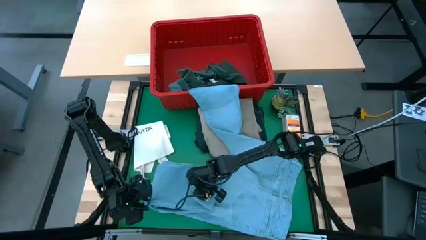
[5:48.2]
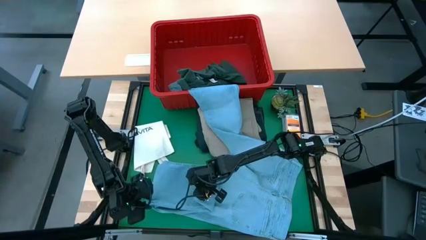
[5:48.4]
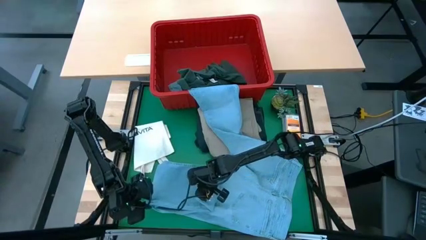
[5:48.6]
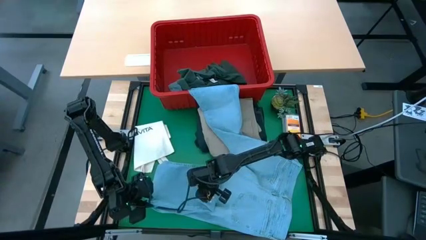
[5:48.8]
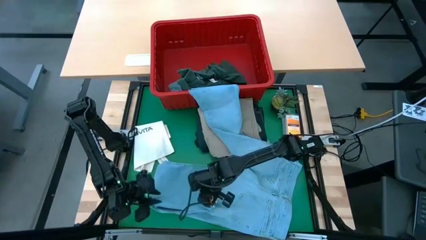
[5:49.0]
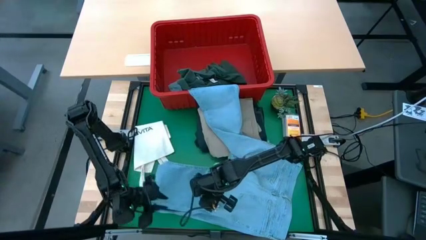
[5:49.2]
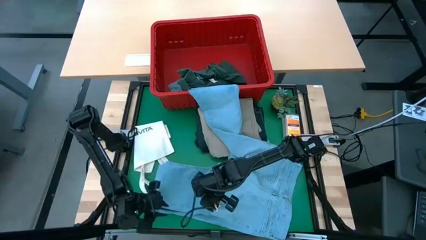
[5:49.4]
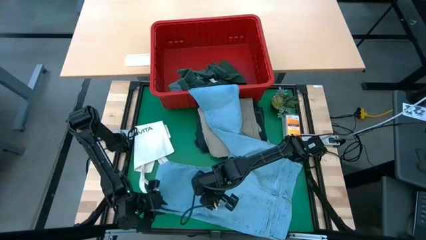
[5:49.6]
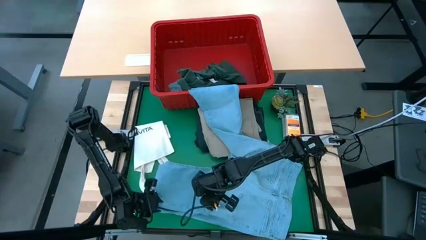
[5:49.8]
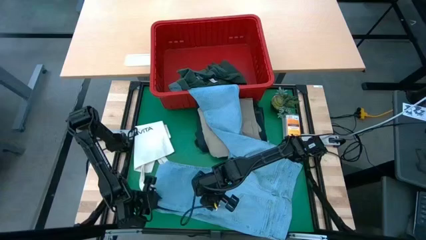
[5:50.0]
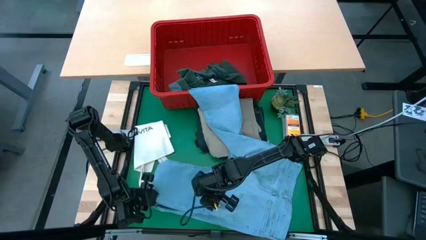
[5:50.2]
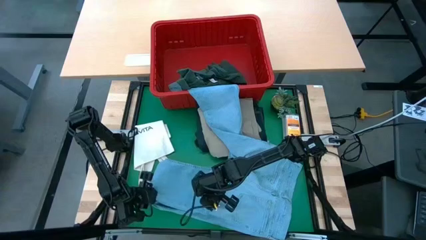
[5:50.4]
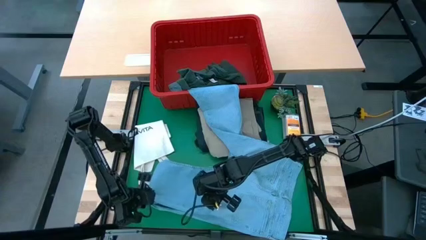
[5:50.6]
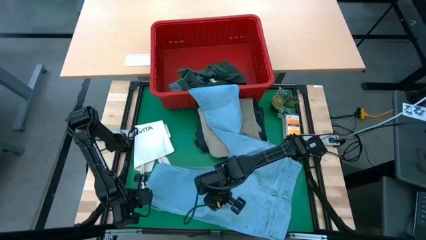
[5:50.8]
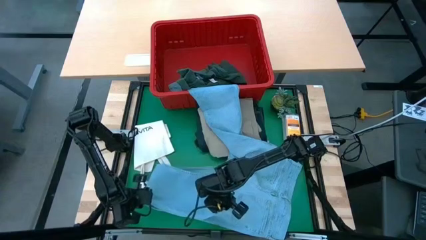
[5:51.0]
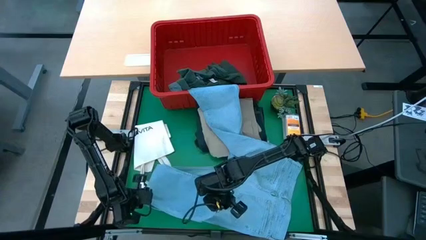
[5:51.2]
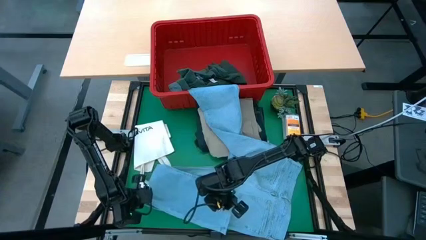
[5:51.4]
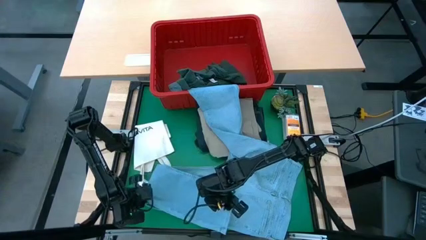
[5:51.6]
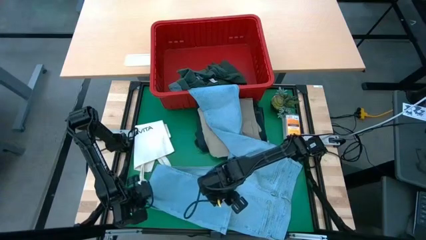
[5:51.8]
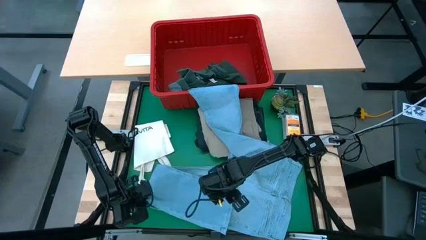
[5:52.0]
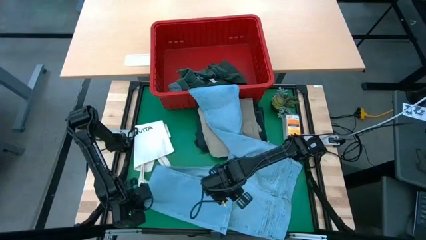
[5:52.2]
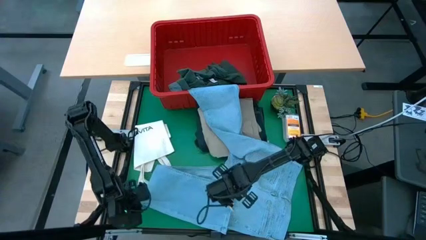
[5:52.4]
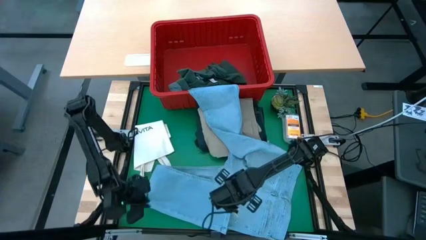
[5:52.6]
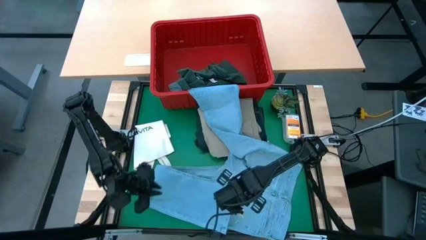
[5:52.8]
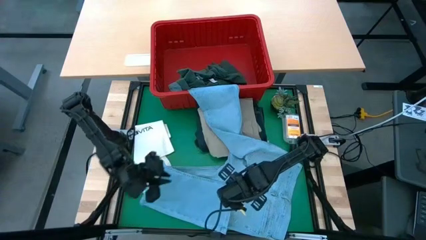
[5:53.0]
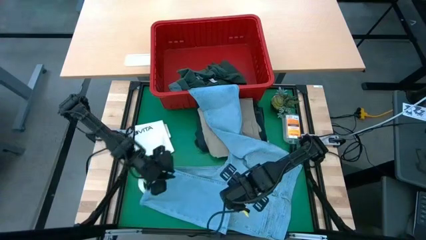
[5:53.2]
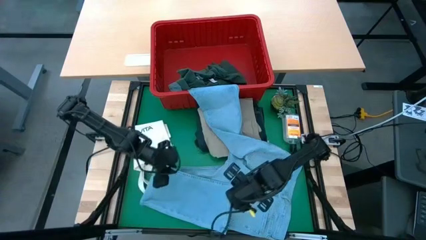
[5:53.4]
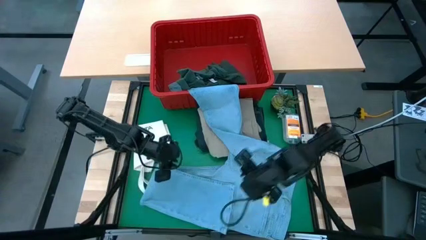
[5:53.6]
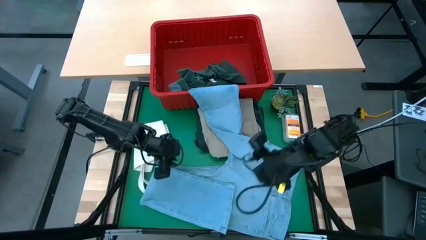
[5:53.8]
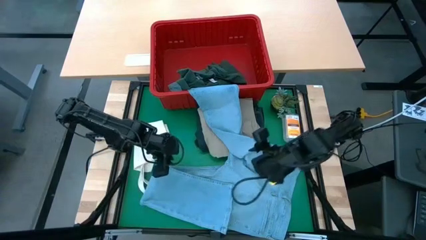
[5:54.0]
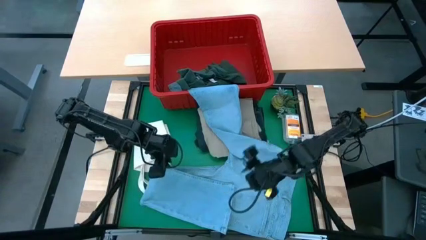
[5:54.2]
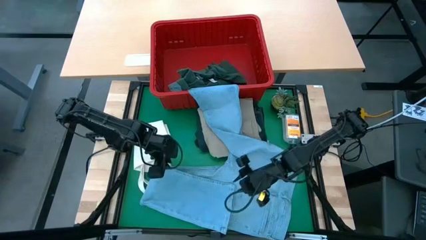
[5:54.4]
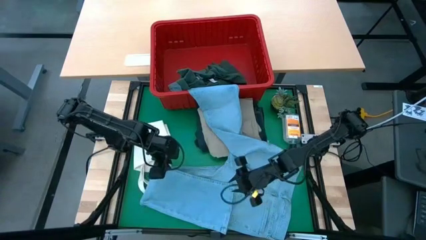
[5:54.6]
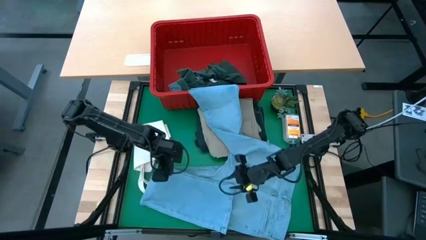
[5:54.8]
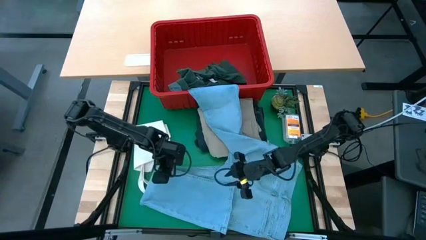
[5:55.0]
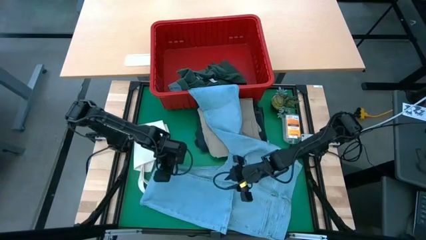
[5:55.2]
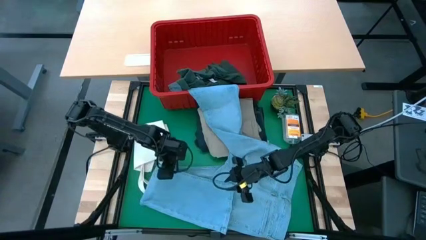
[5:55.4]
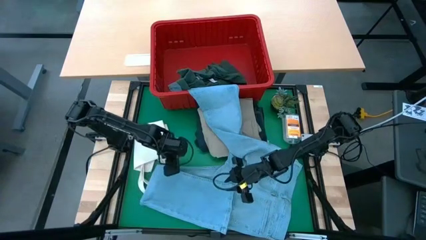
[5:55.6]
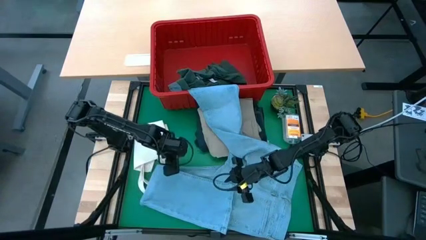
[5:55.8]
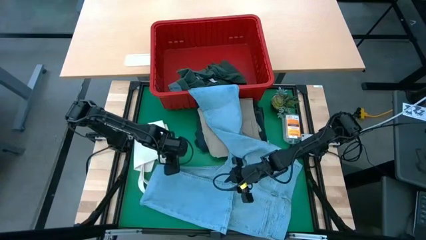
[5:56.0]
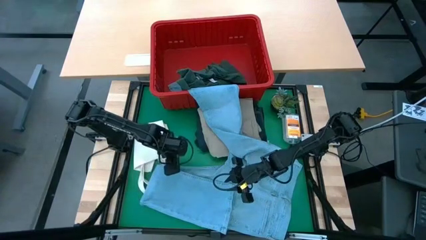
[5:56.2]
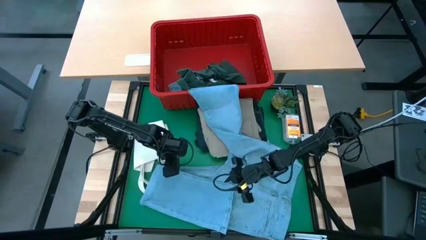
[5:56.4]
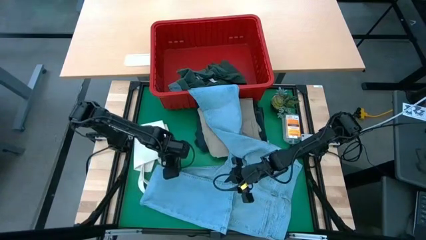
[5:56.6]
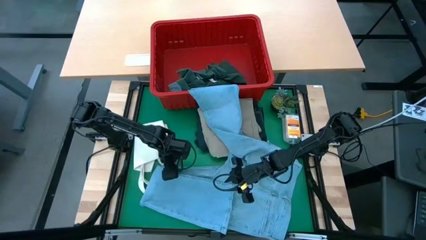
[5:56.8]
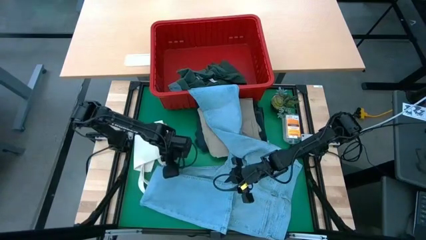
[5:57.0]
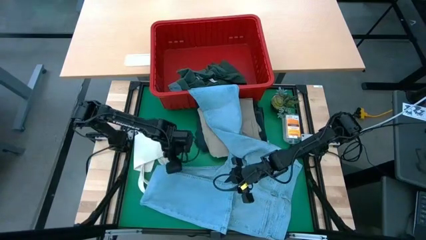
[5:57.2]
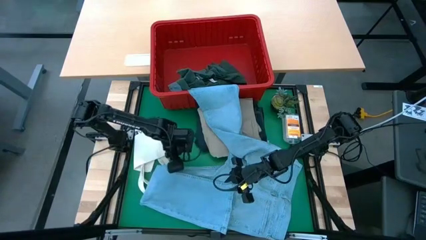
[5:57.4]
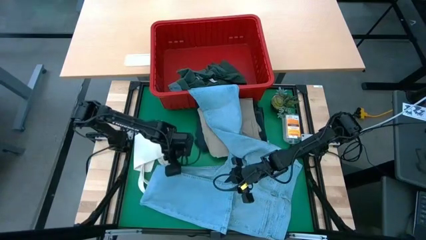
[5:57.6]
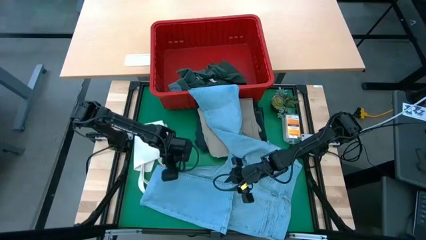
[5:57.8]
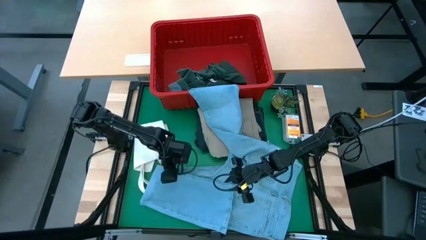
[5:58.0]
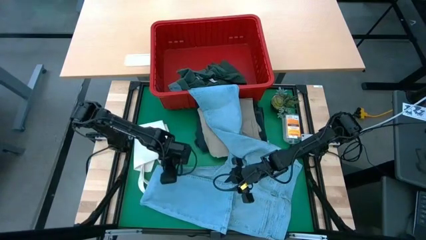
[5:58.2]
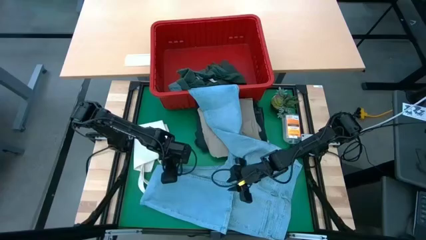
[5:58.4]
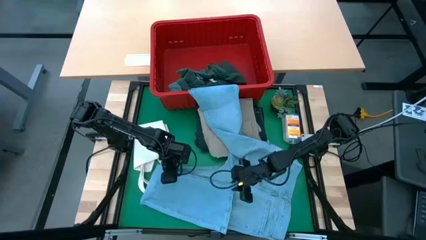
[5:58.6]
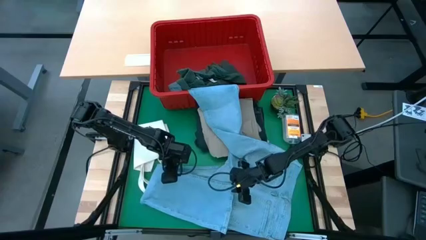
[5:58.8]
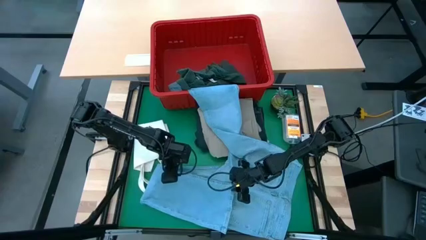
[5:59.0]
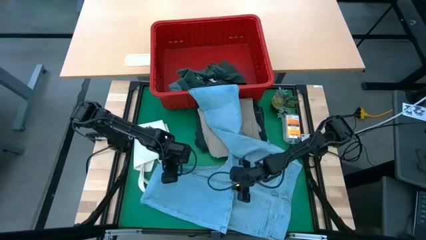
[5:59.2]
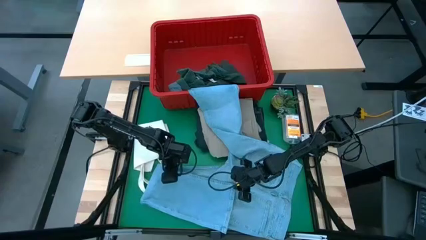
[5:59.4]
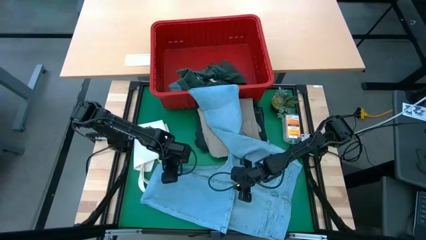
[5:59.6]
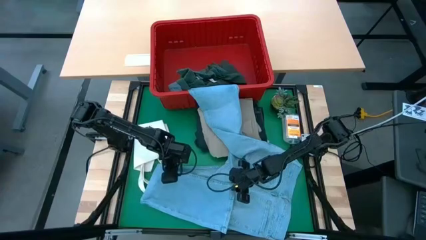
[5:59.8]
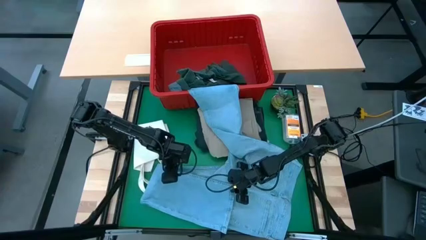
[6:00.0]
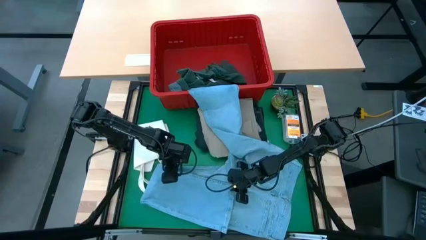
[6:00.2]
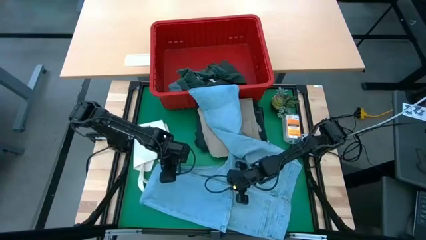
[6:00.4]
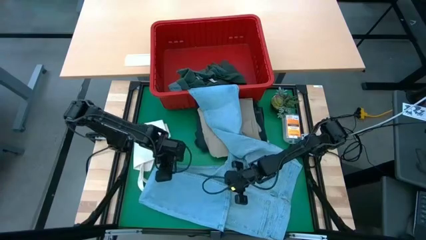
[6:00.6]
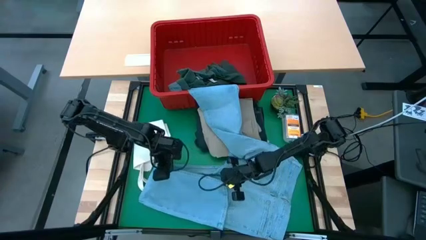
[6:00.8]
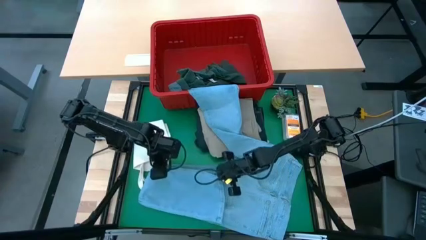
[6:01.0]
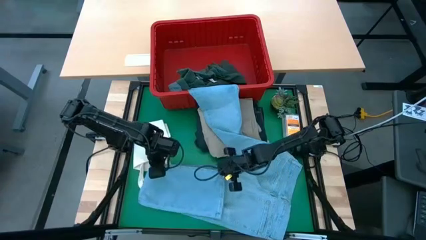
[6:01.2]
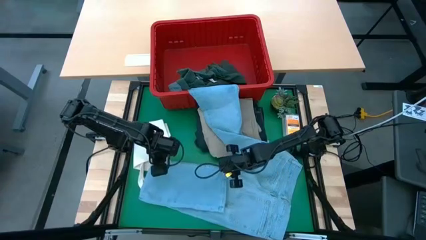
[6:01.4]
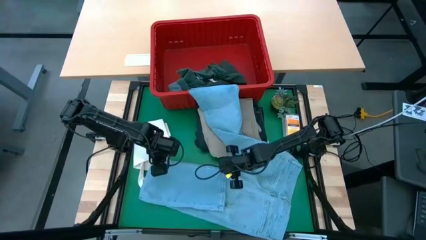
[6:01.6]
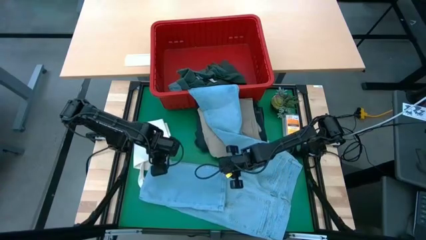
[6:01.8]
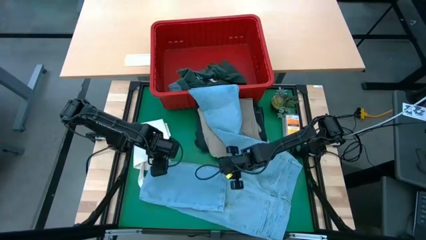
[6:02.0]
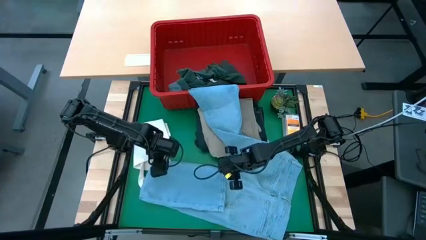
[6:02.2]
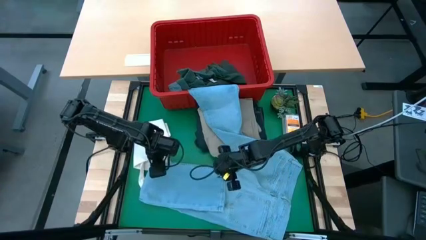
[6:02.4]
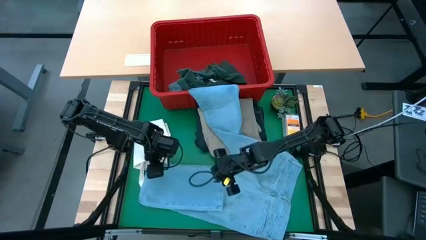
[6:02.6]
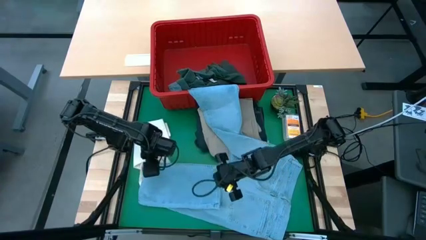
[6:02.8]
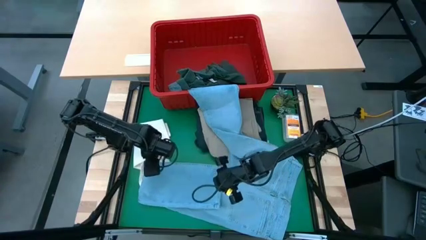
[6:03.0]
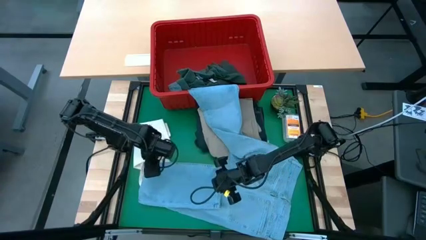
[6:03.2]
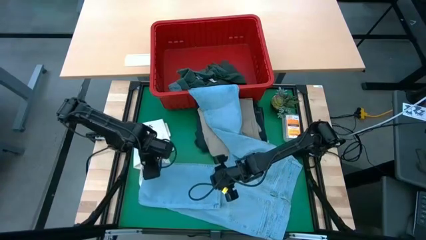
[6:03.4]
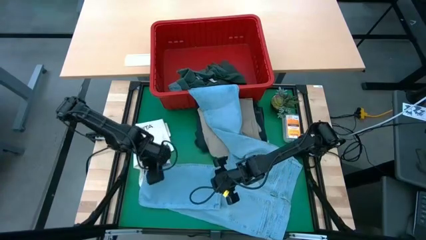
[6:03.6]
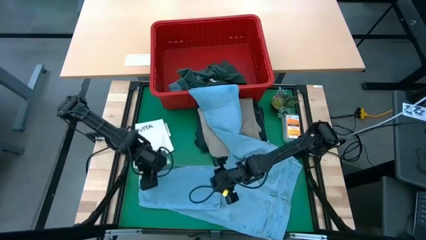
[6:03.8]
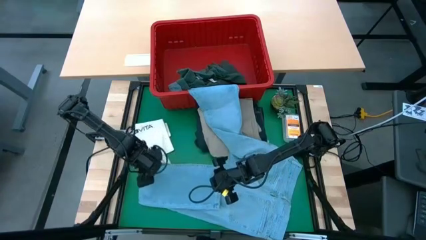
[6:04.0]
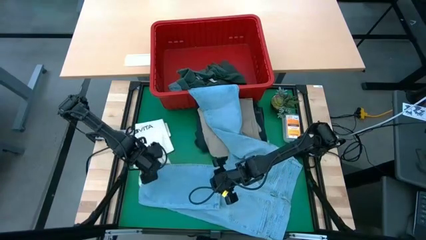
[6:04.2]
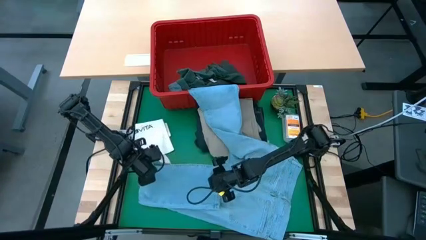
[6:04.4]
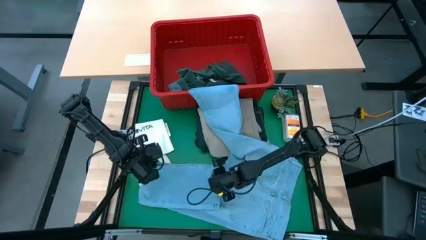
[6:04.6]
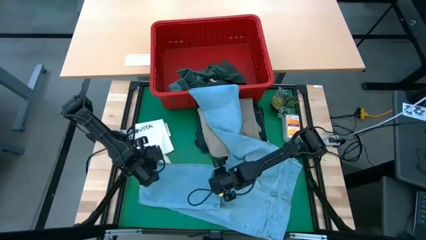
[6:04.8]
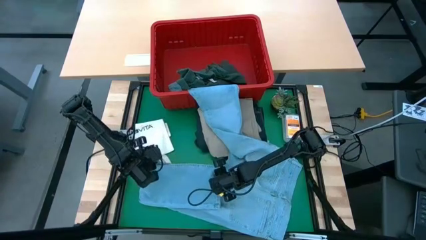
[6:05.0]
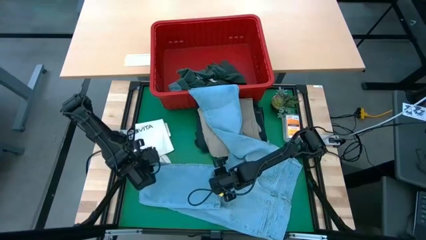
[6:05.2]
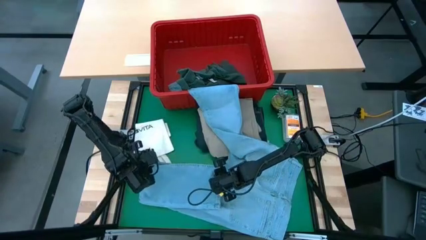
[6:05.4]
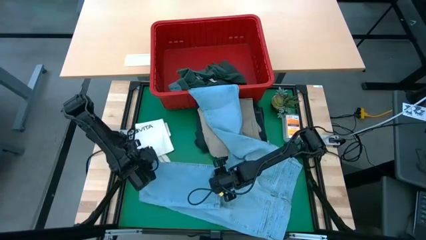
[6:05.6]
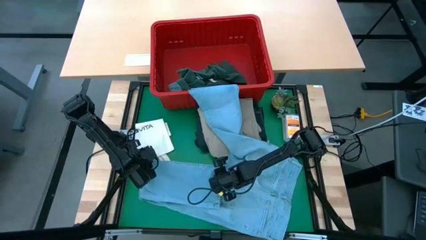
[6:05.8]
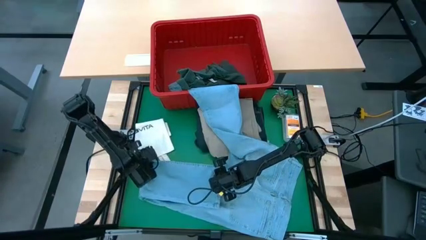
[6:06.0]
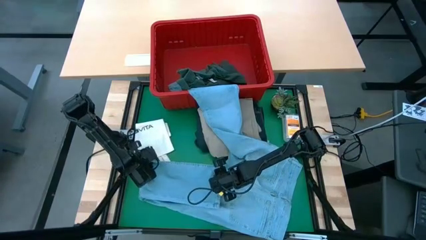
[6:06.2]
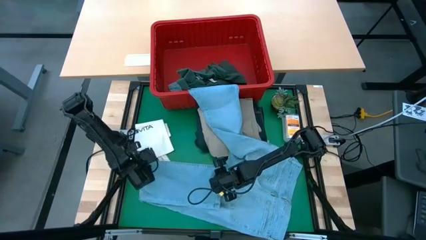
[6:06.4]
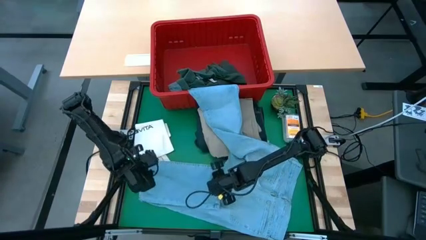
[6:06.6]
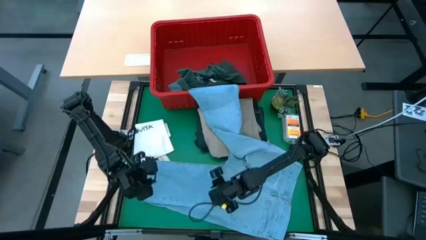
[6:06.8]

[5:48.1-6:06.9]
Task: Fold laundry
Remove the blue pants from the laundry bin
